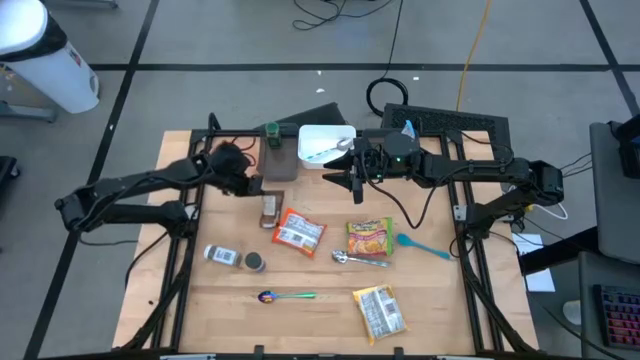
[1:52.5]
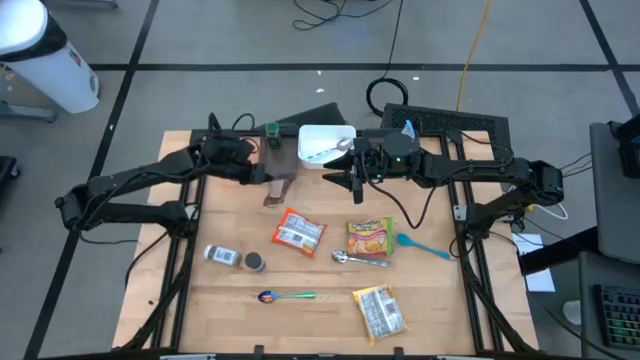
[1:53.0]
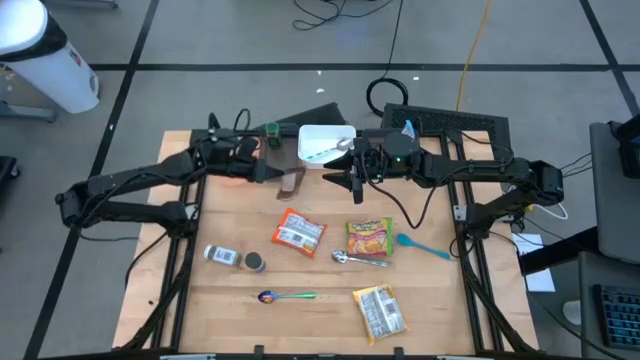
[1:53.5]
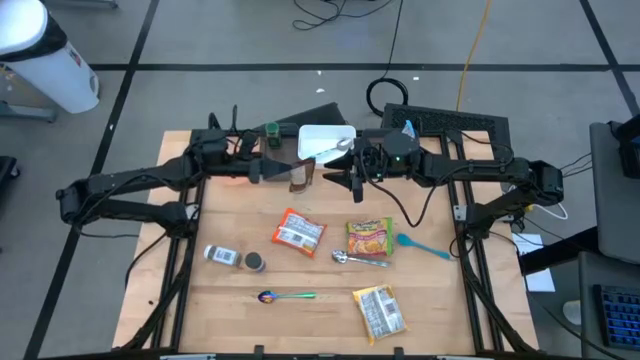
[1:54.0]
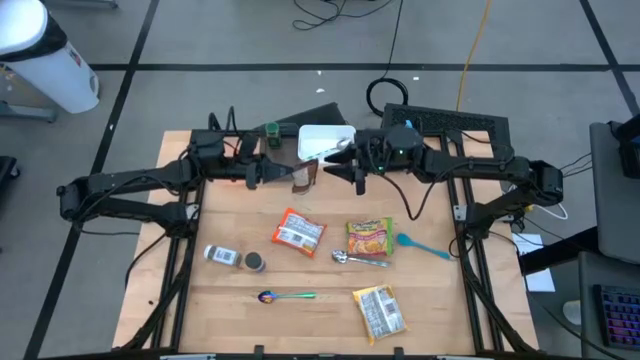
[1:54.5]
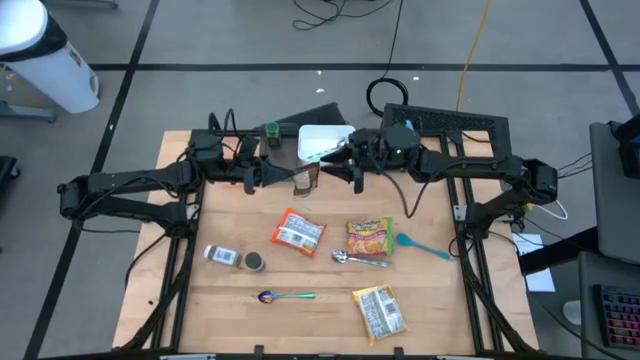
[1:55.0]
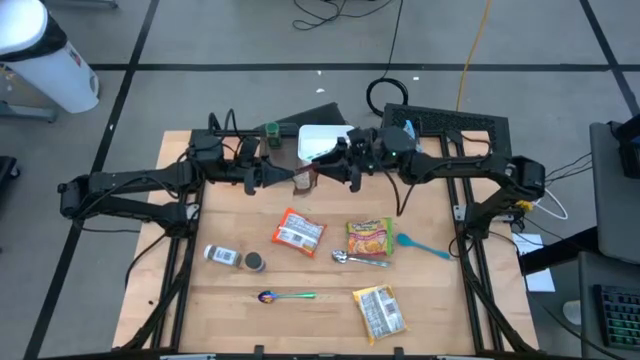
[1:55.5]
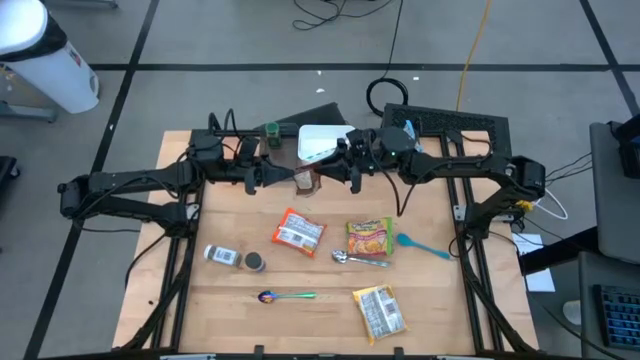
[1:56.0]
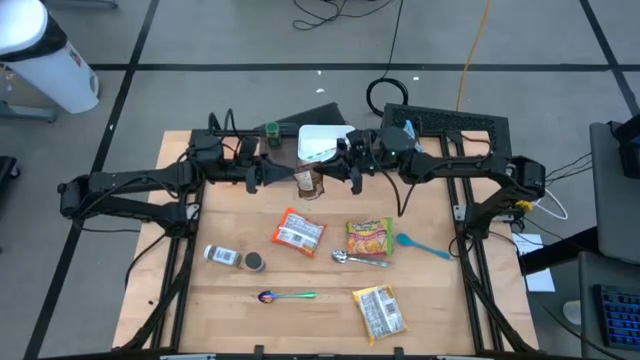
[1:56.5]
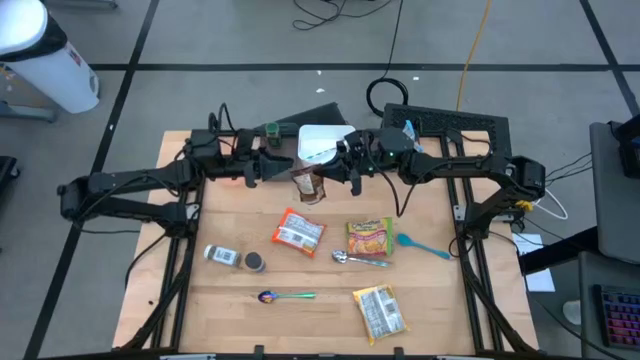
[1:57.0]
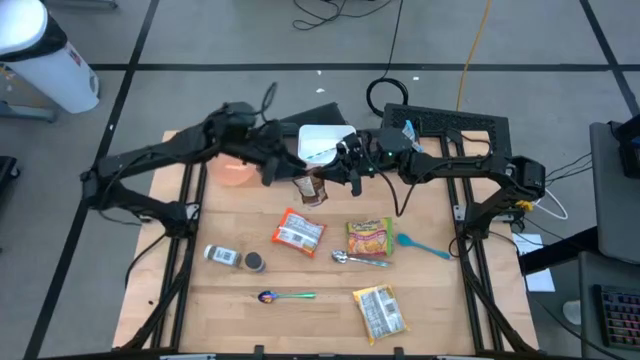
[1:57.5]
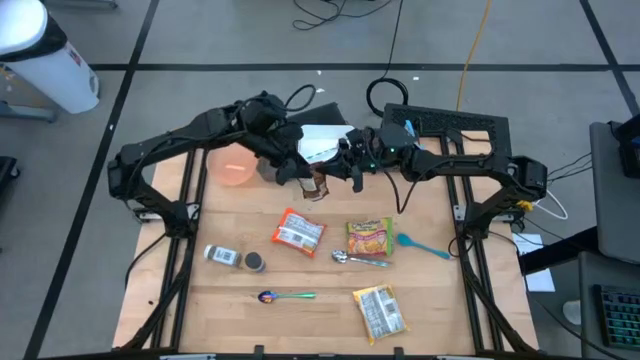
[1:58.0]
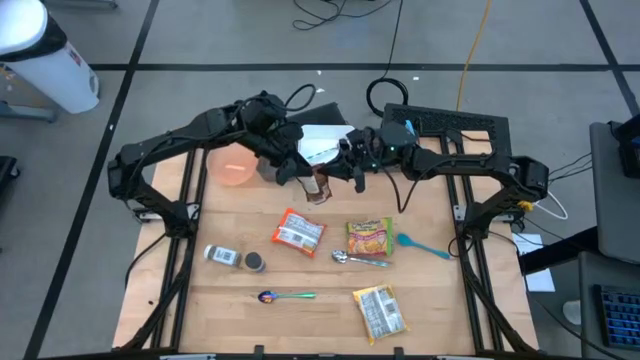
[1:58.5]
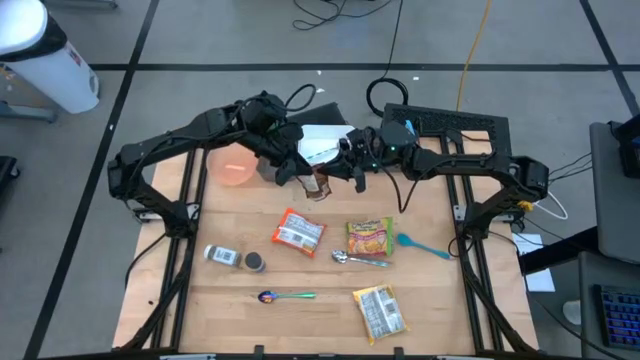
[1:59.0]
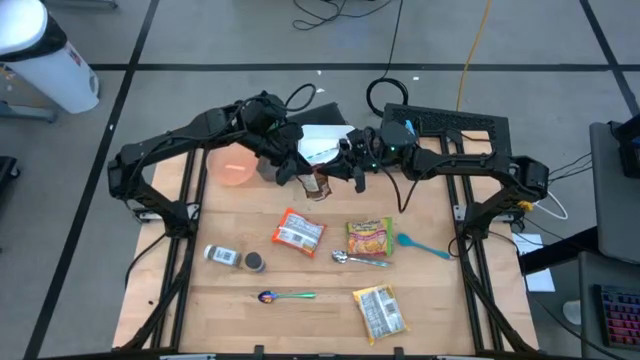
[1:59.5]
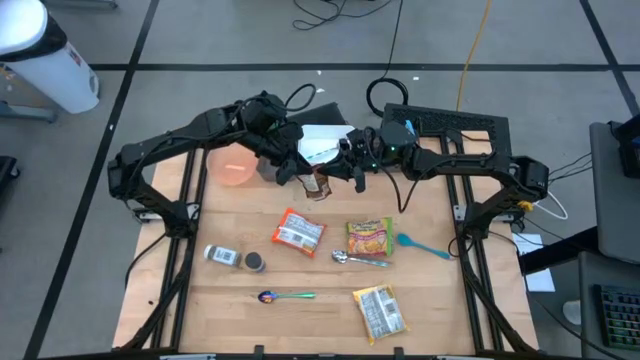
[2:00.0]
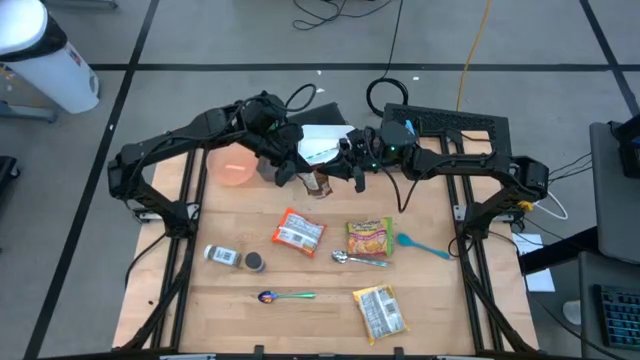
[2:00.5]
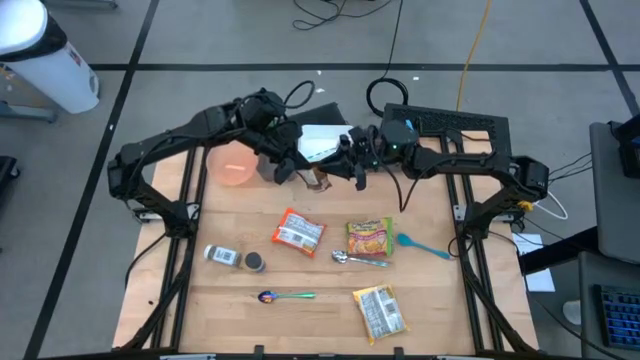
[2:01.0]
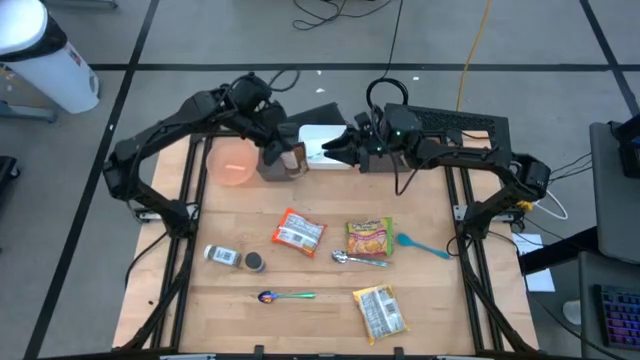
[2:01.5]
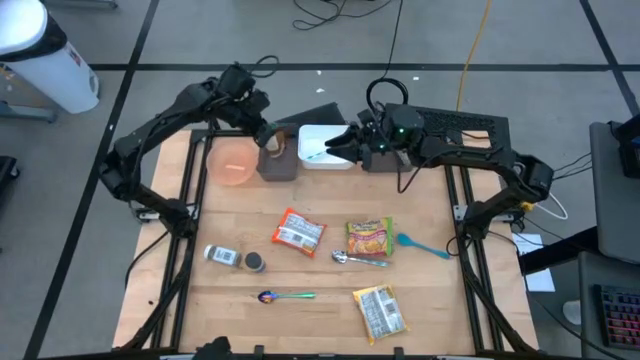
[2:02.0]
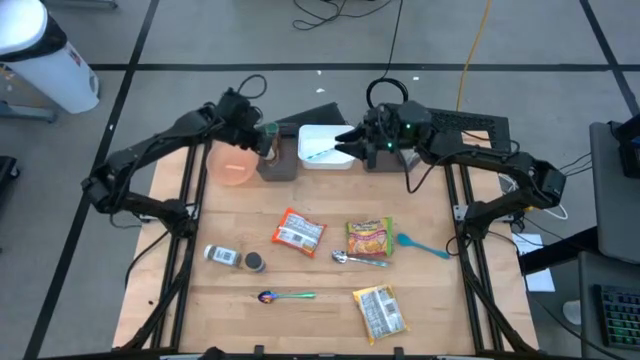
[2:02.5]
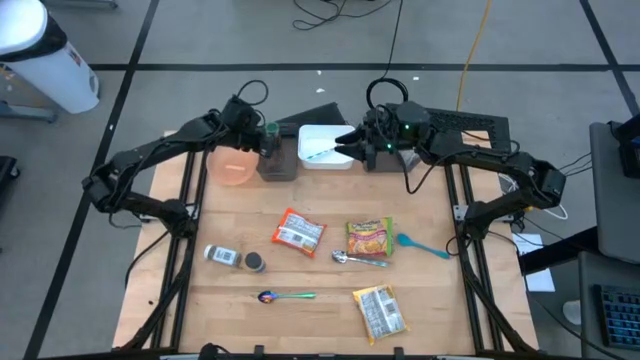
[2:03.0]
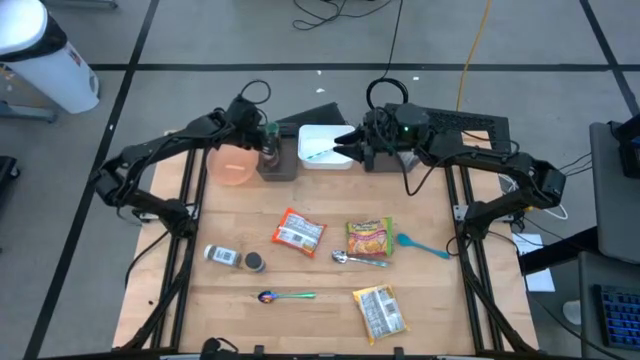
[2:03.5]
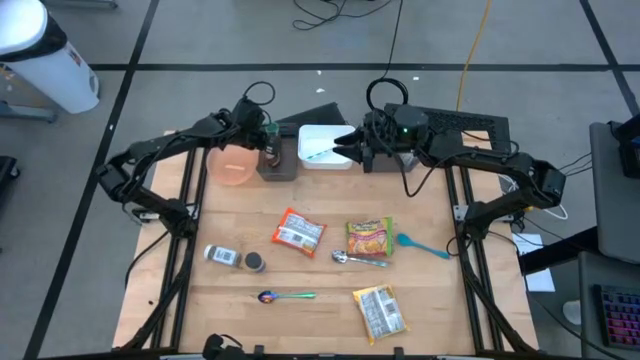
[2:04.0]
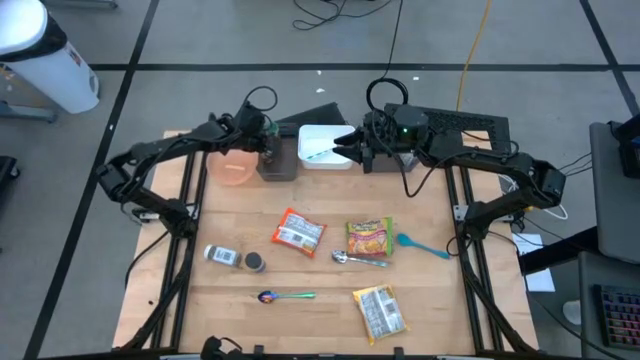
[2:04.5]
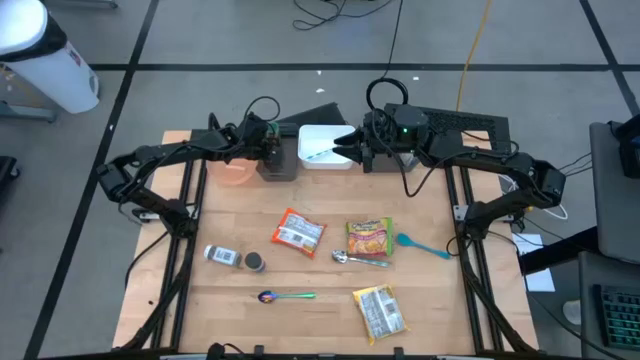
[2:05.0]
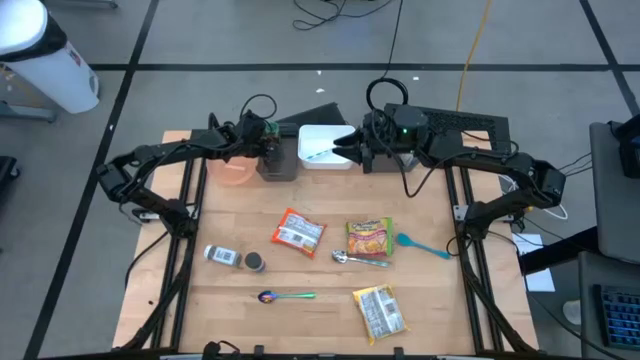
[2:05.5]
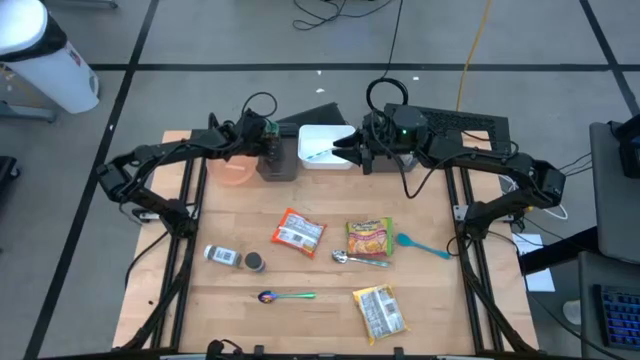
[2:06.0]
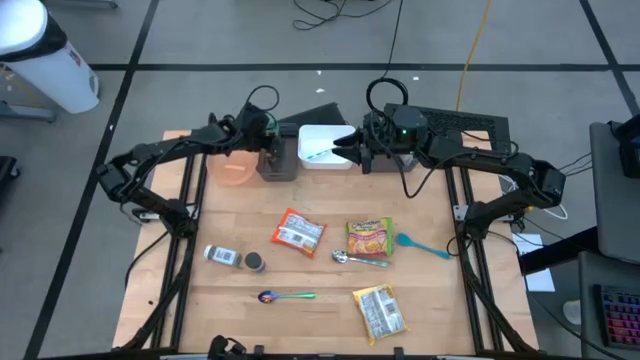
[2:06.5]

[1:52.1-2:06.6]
Task: Pick & Place Food Item
Put the orange seasoning pack into the left black bin

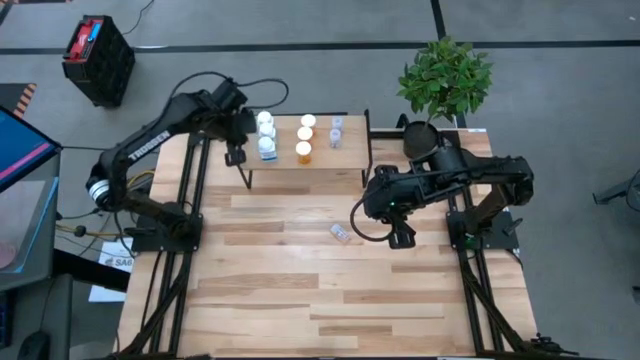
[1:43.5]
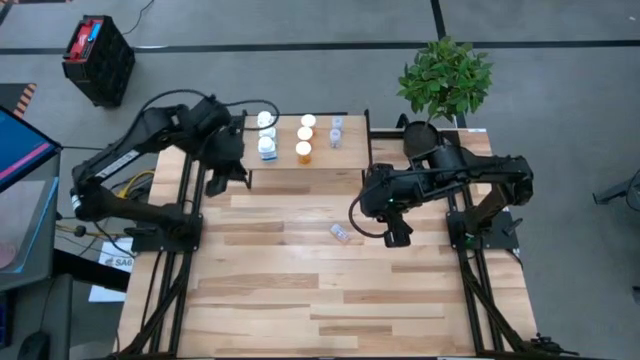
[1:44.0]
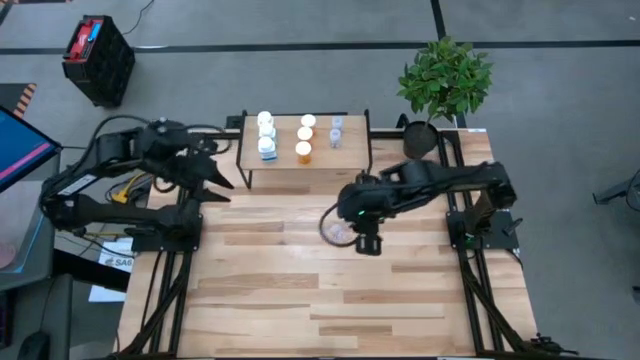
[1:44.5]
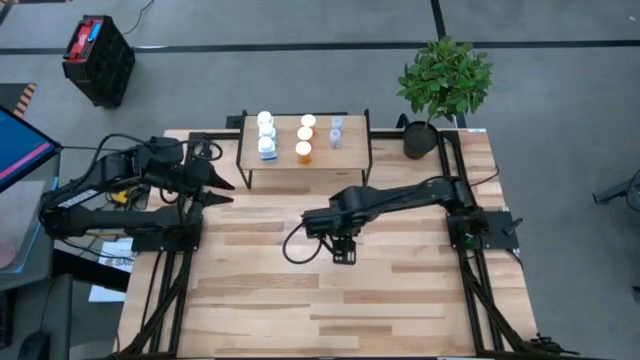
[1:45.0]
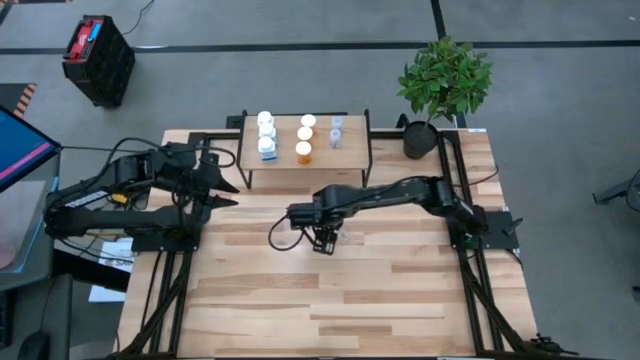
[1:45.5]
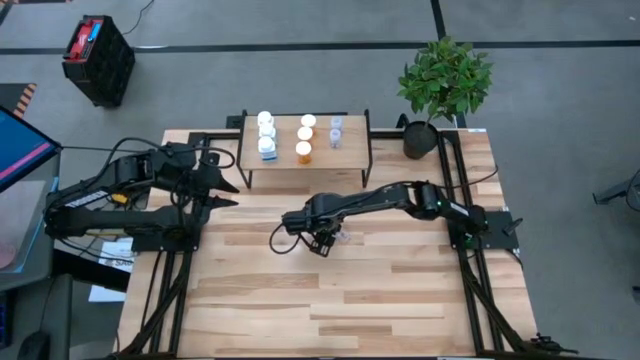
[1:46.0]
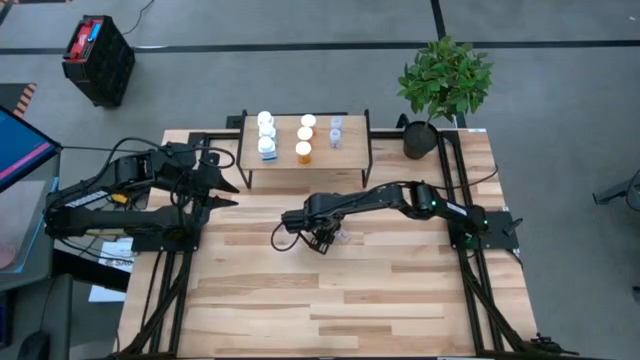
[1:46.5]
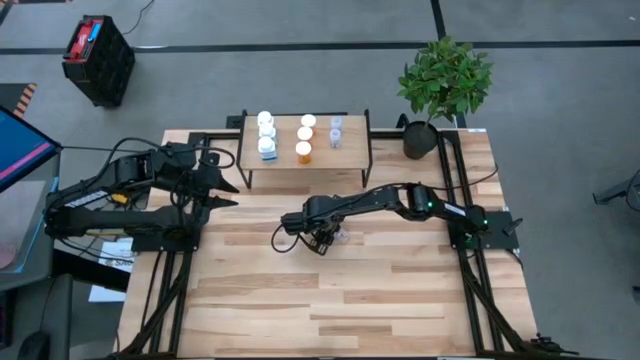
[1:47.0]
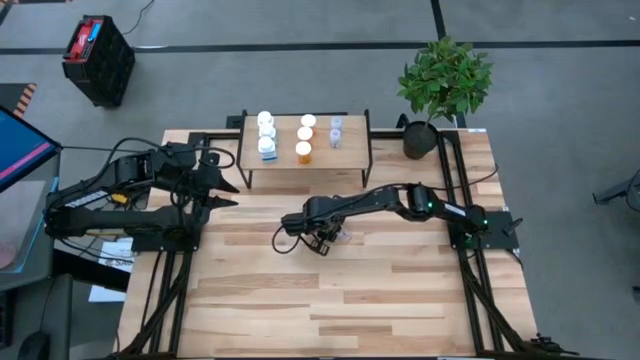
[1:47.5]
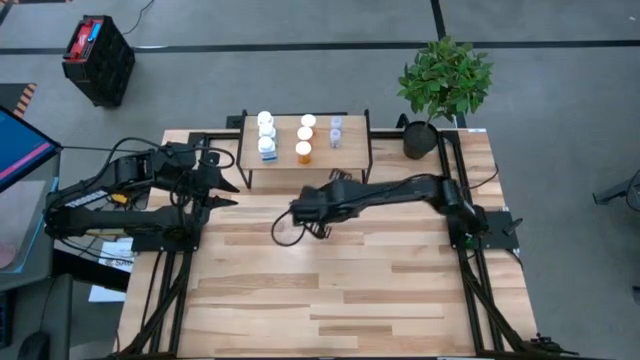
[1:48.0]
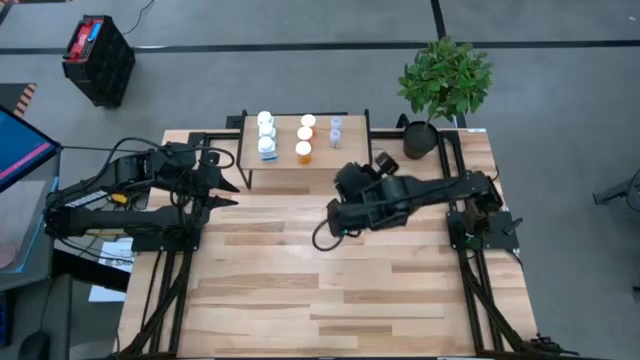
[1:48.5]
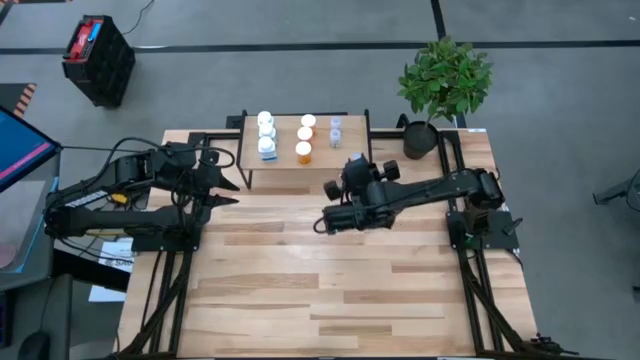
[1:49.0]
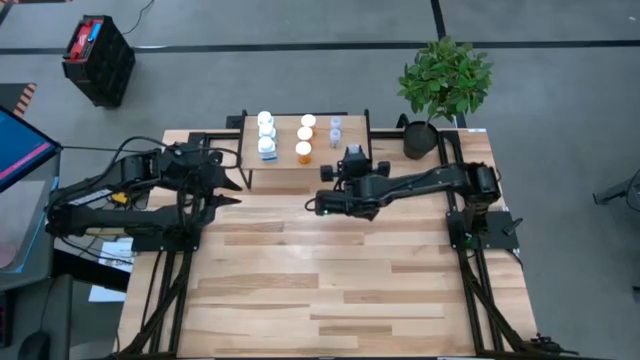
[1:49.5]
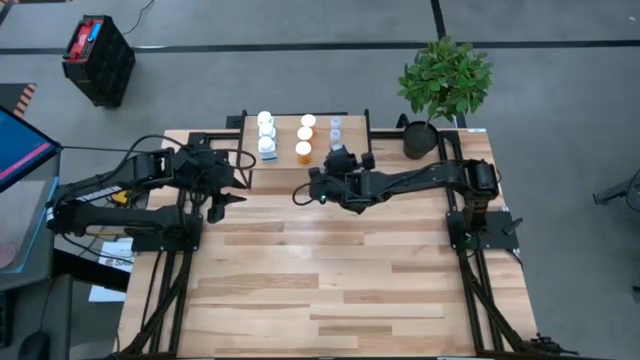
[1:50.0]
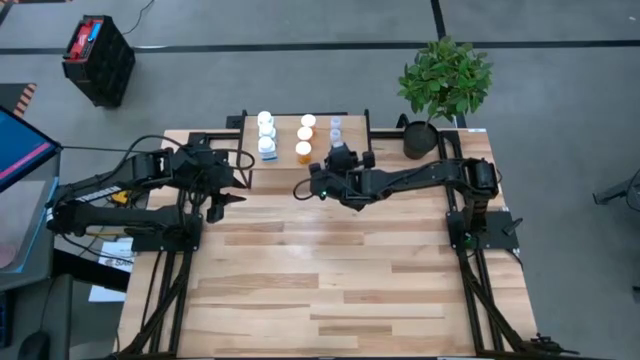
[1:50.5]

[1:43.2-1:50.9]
Task: Pick and place medicine bottles onto shelf by color
Put the transparent pill bottle on the shelf aligned with the other transparent pill bottles
